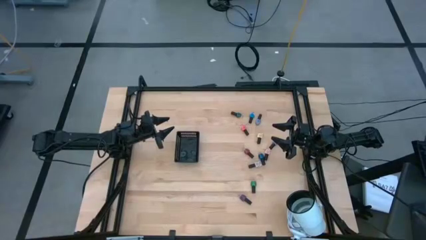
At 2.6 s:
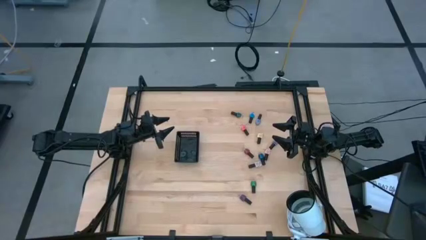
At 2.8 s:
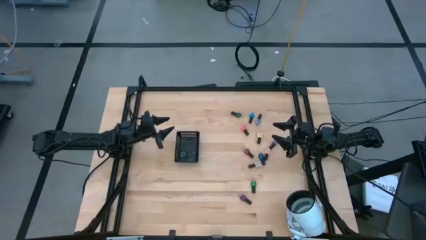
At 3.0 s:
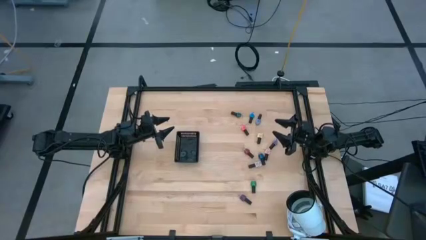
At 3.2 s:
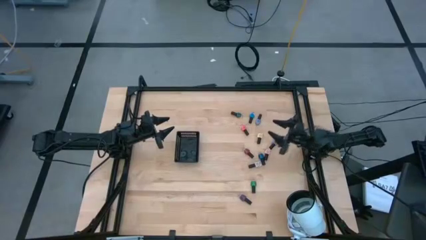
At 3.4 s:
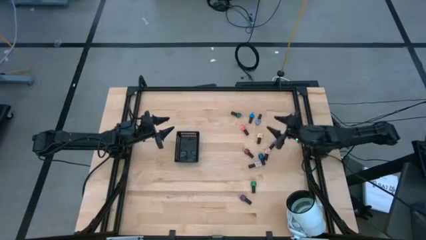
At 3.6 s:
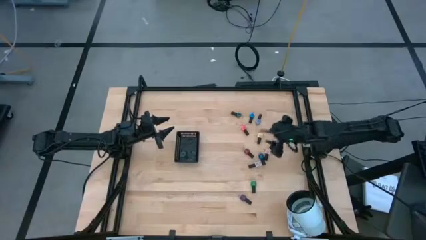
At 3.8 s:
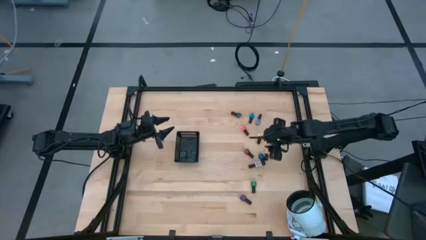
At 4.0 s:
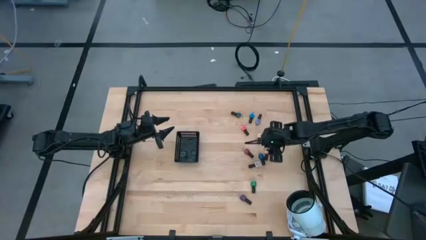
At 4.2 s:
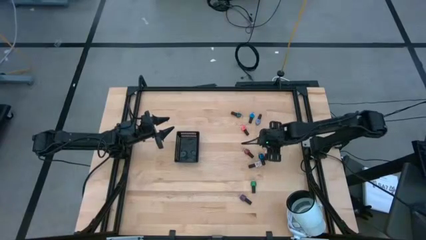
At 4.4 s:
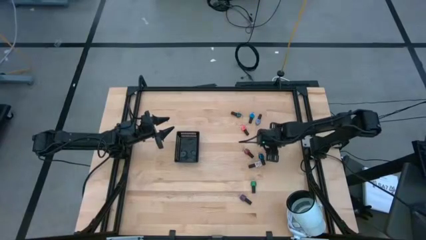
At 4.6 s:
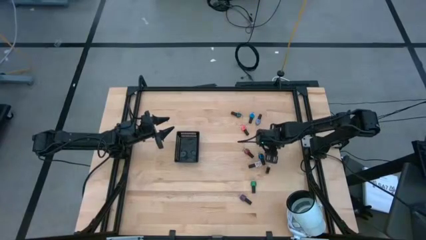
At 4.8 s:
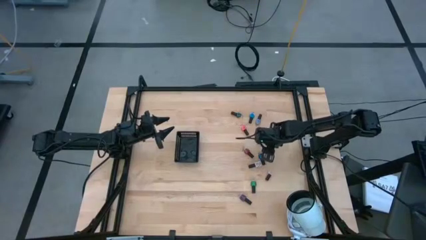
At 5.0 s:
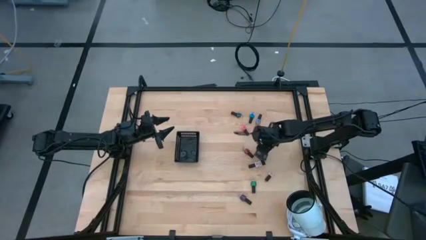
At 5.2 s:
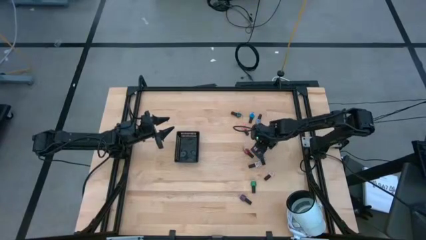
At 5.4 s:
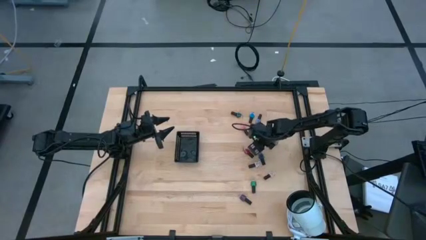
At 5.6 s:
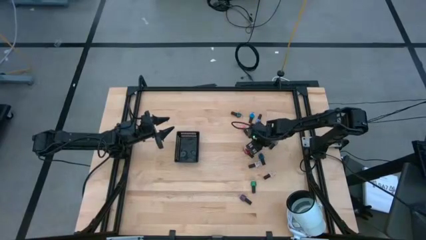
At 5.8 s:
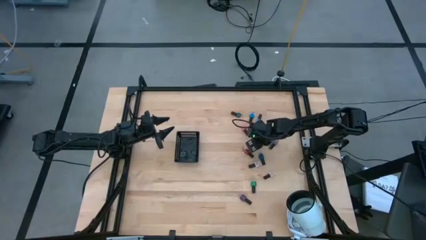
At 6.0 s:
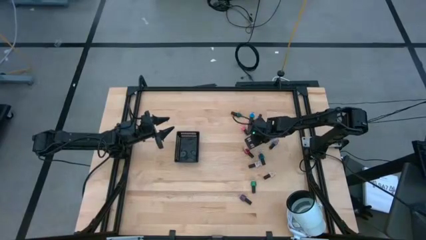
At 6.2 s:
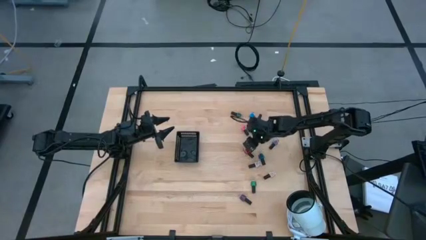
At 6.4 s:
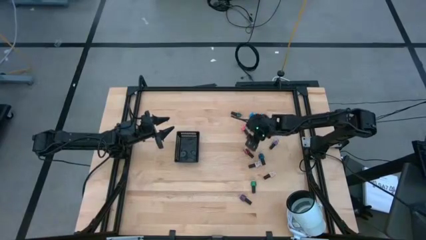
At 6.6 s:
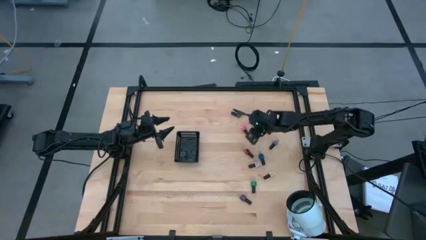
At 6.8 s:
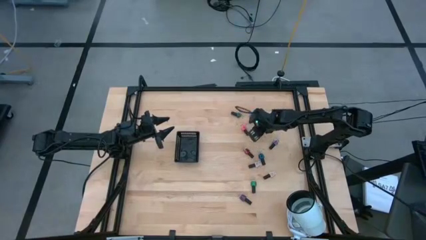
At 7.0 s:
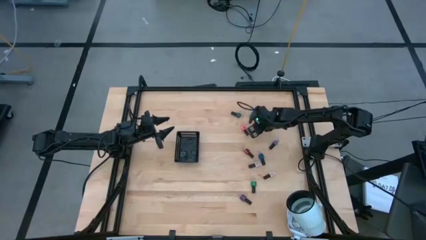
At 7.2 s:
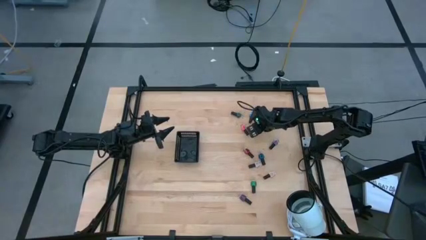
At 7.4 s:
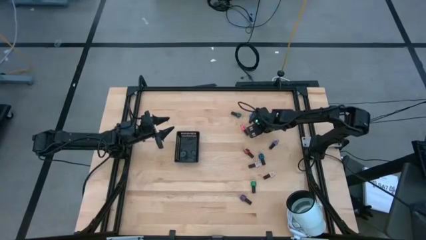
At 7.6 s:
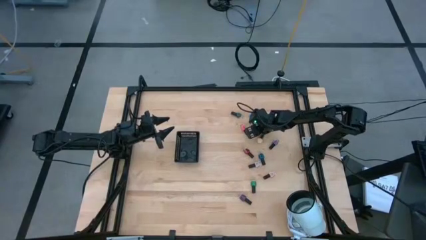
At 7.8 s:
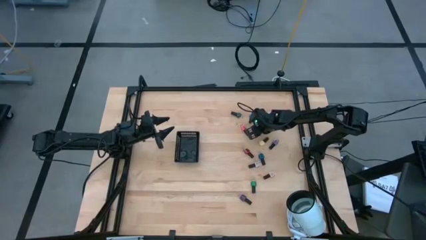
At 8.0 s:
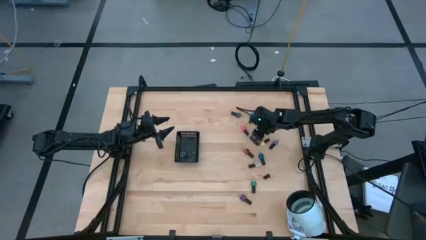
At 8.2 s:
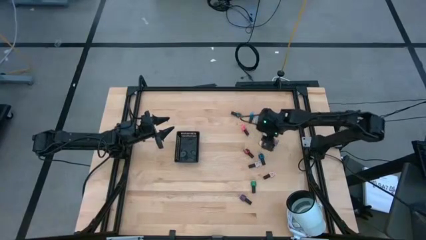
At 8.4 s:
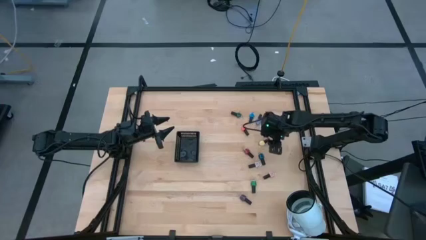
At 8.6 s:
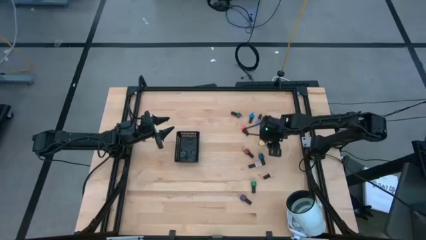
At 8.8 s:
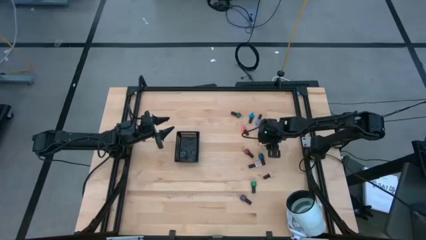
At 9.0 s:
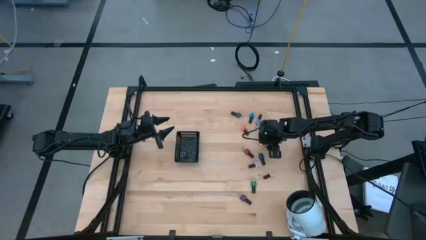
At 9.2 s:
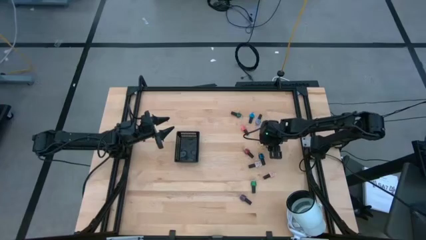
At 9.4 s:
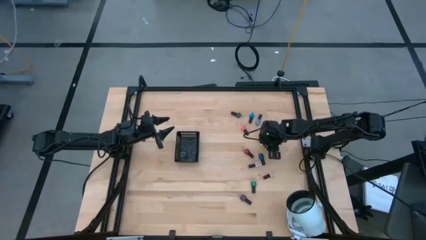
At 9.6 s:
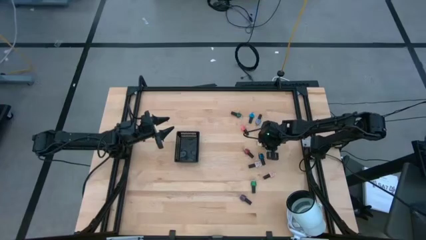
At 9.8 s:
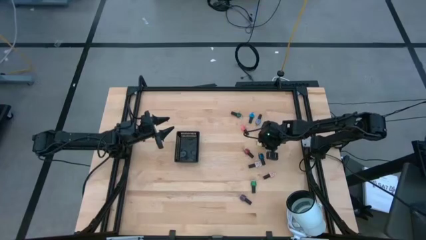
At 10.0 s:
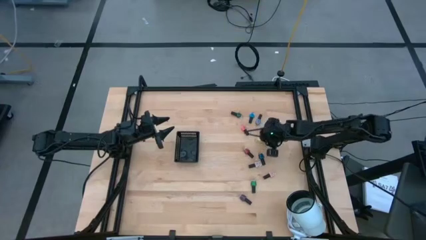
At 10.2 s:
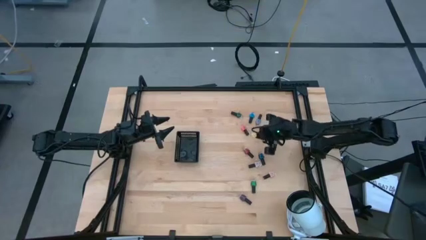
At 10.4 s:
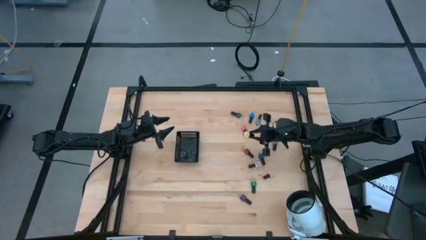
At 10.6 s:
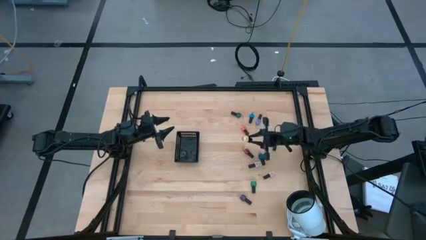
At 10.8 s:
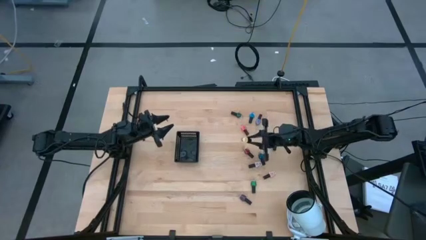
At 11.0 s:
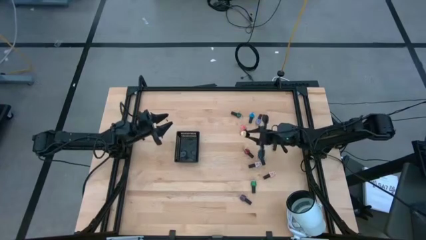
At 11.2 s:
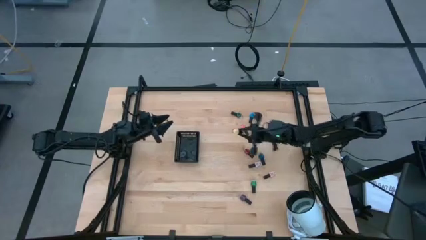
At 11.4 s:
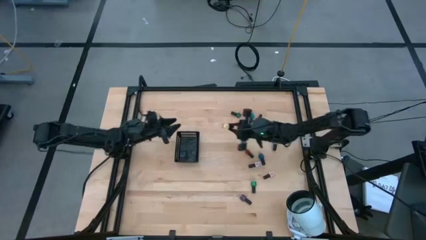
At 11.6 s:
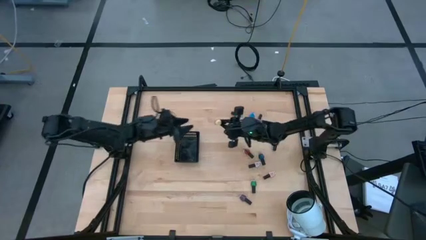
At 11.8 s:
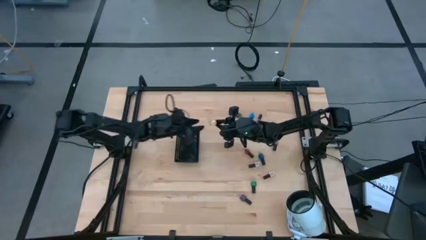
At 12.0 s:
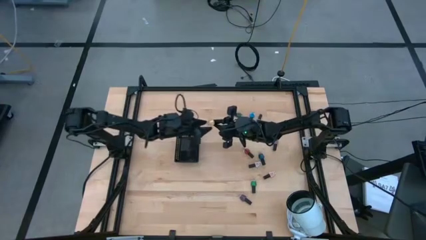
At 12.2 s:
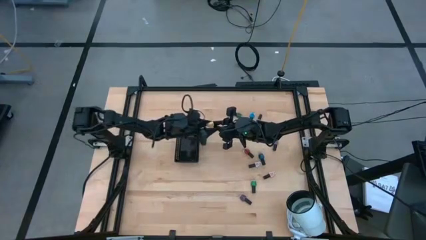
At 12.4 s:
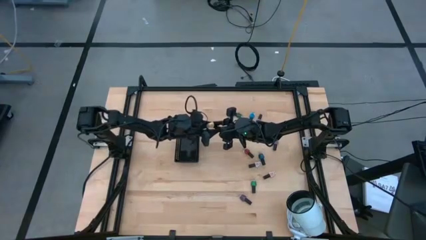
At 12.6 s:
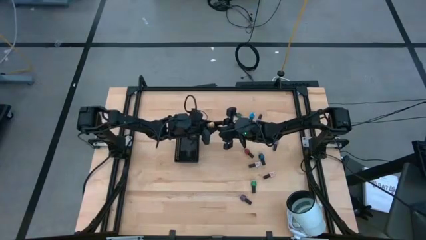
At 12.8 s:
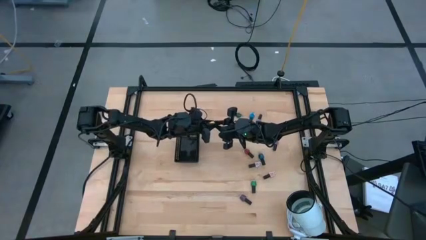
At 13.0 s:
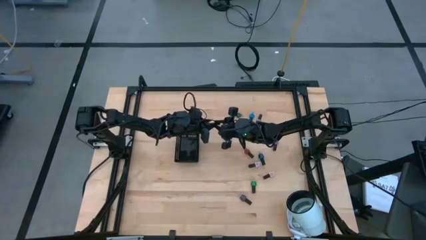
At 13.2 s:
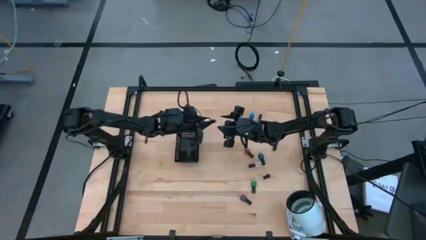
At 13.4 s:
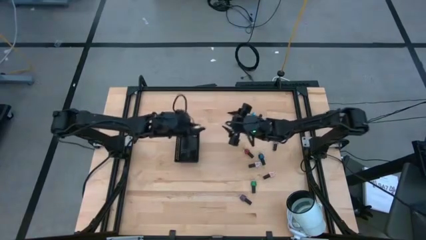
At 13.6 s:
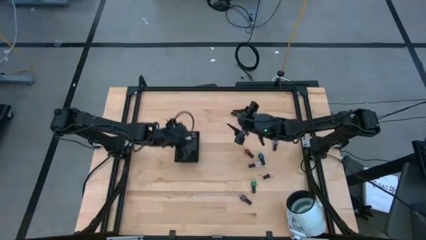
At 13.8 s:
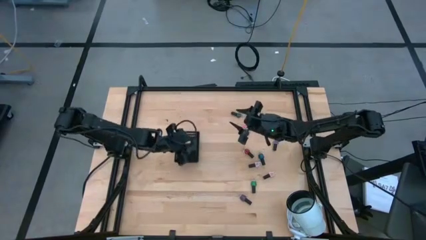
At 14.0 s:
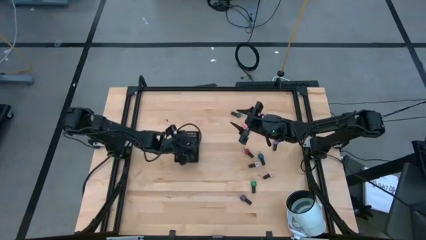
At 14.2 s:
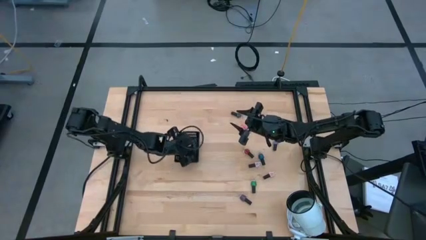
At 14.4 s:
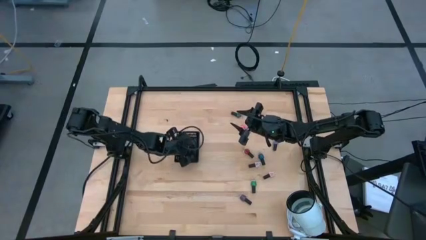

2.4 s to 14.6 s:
Task: Pick & Place Nail Polish
Put the yellow nail polish into the basket
